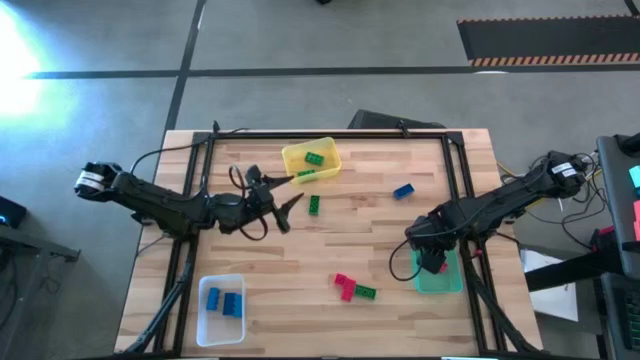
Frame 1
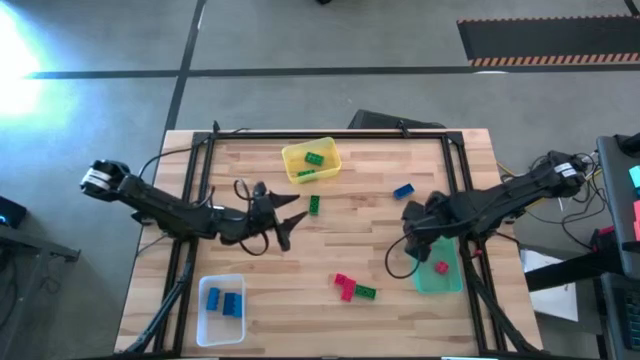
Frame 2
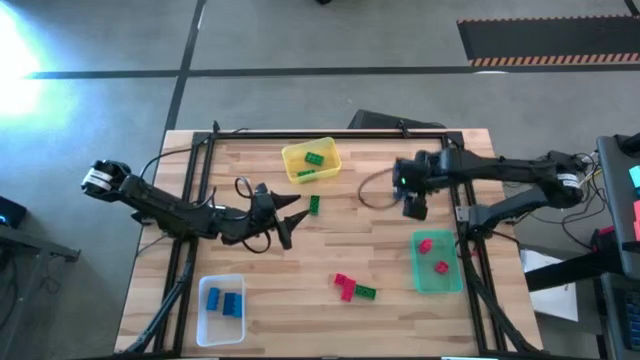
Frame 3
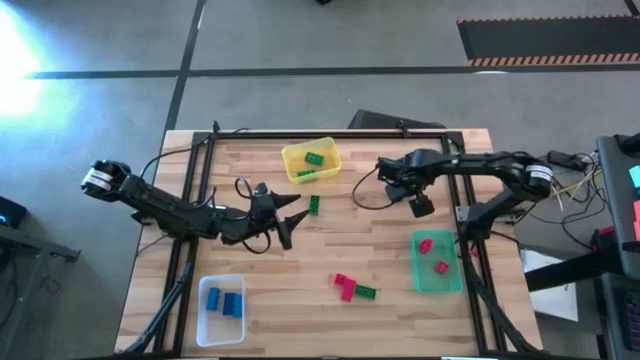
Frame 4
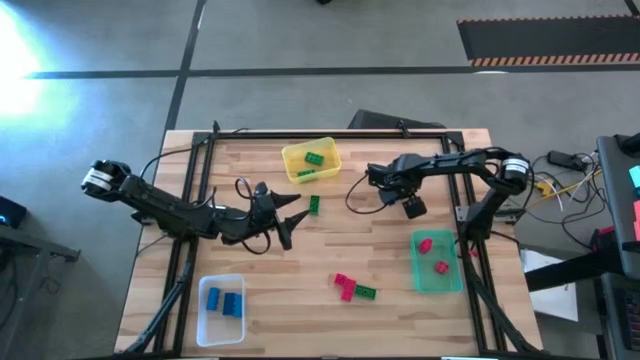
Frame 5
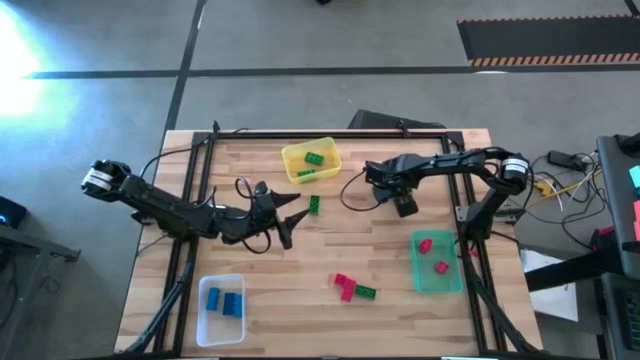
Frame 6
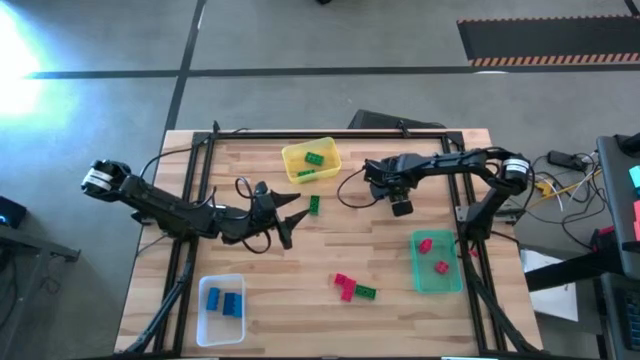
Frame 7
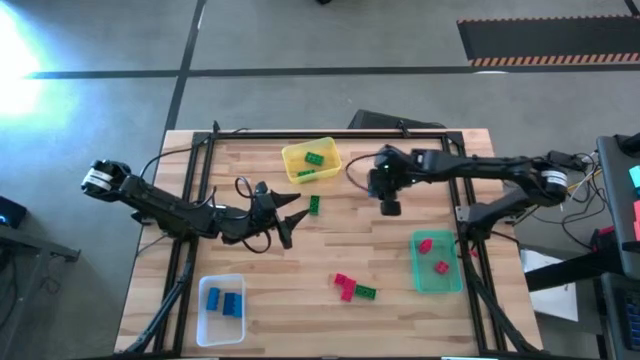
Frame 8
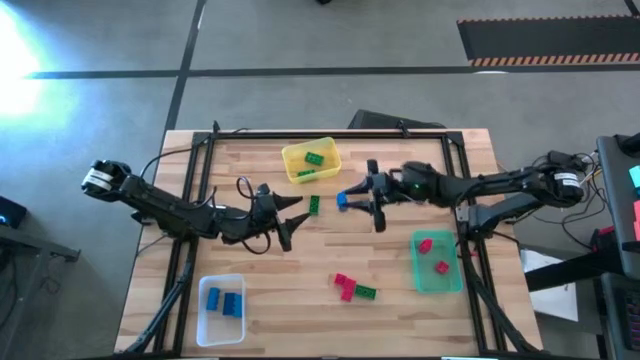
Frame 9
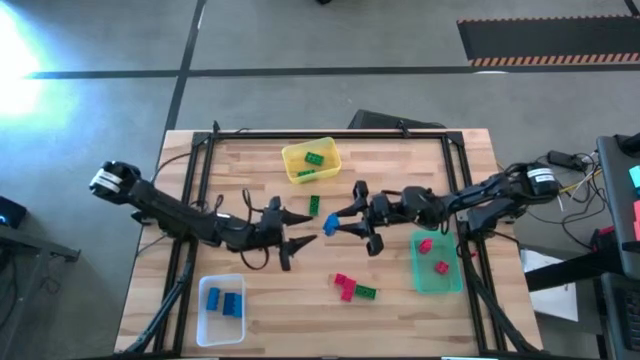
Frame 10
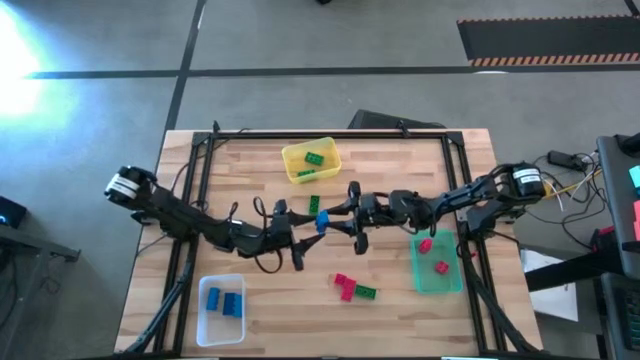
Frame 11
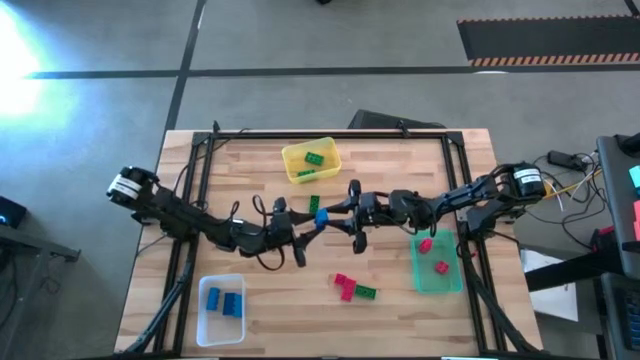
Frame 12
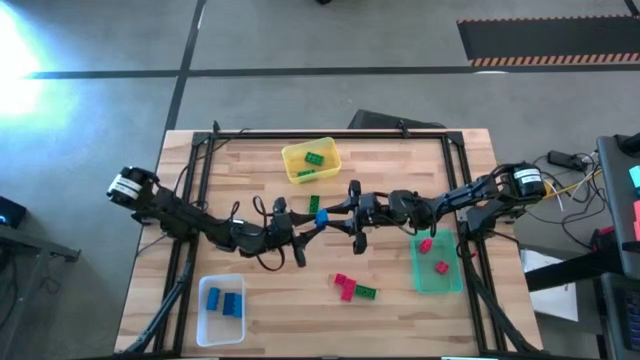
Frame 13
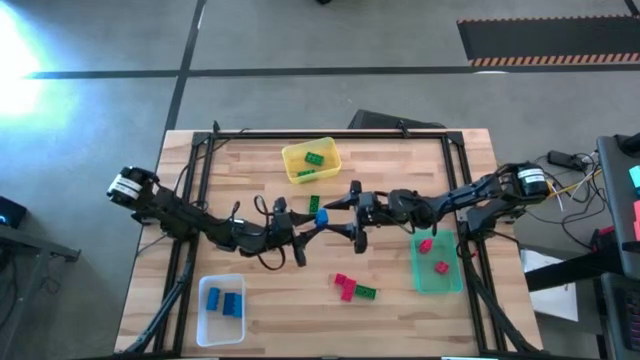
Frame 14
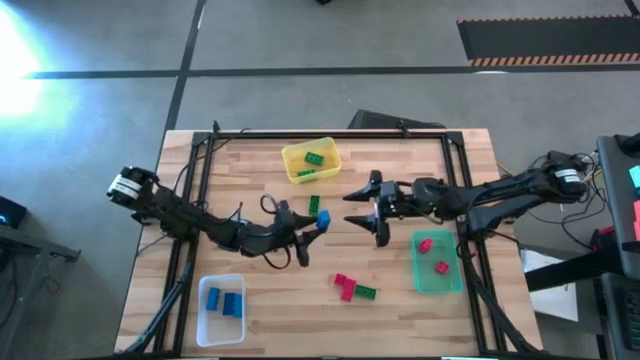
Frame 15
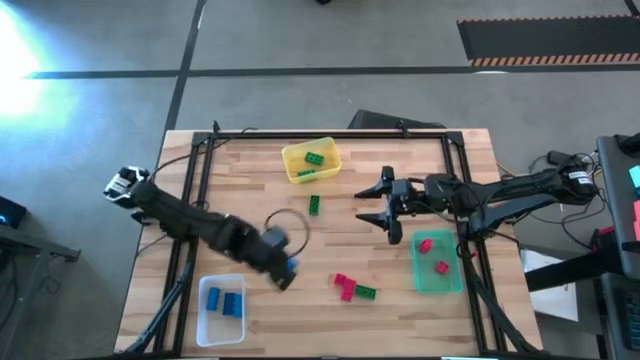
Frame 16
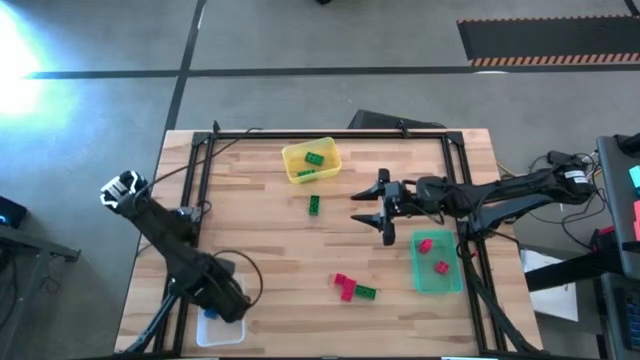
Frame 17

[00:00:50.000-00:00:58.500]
Task: Sort & place blocks by color
Put the blue game piece into the transparent bin

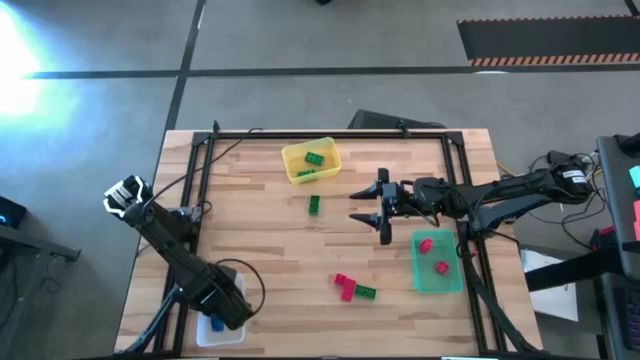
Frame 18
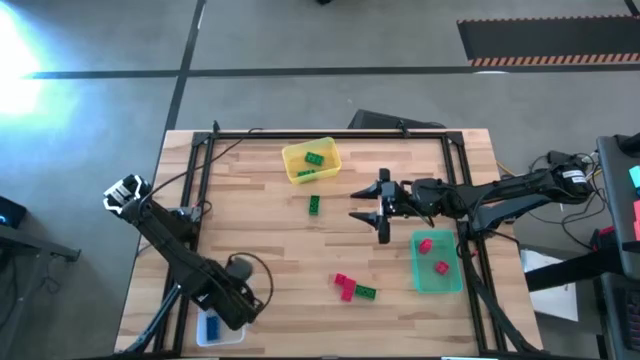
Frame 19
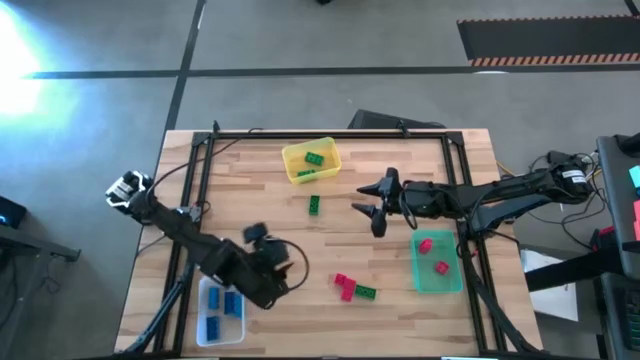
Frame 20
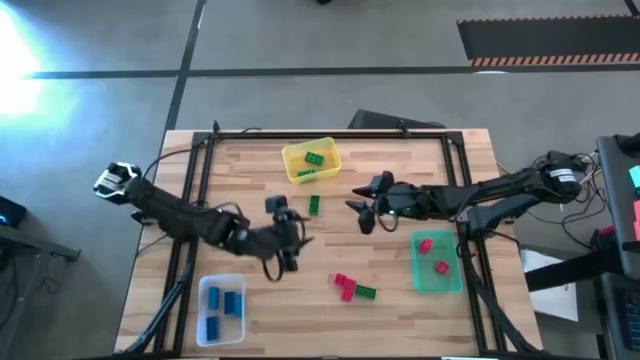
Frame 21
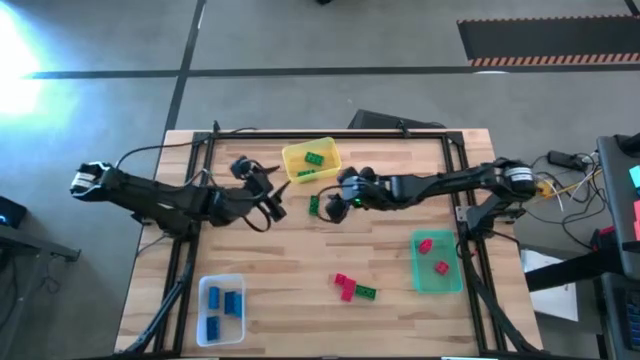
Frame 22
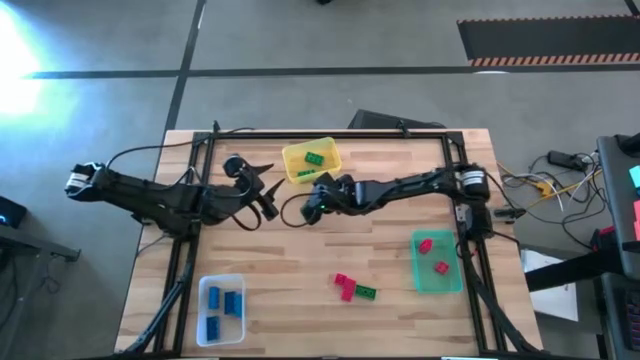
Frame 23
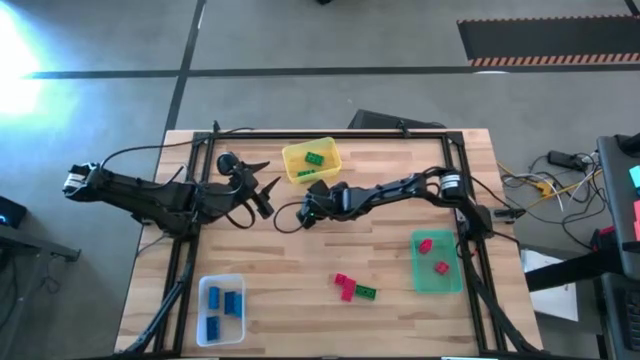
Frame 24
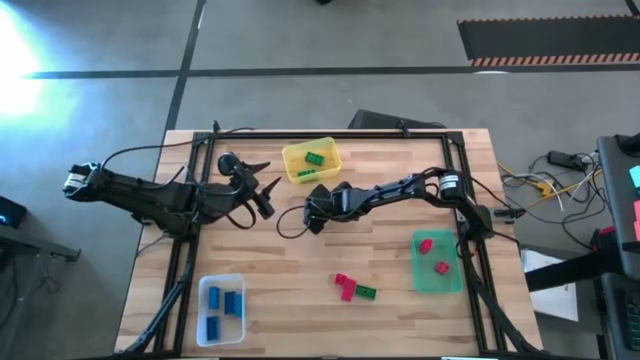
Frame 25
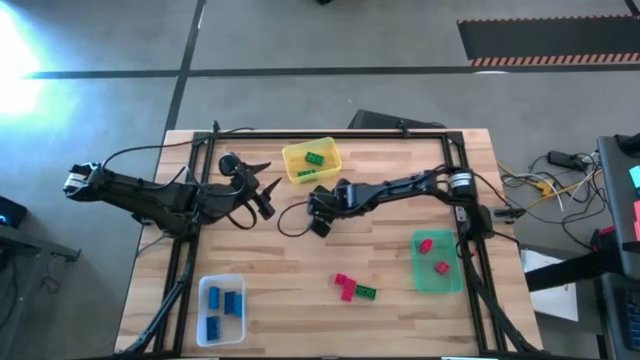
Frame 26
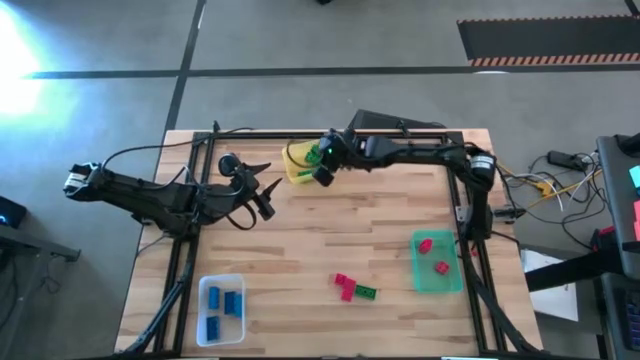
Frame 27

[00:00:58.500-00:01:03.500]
Put the green game piece into the yellow bin

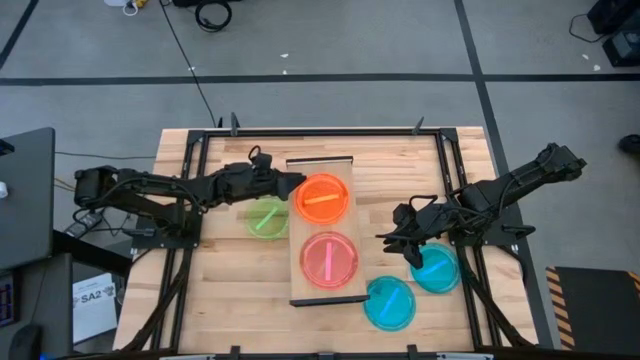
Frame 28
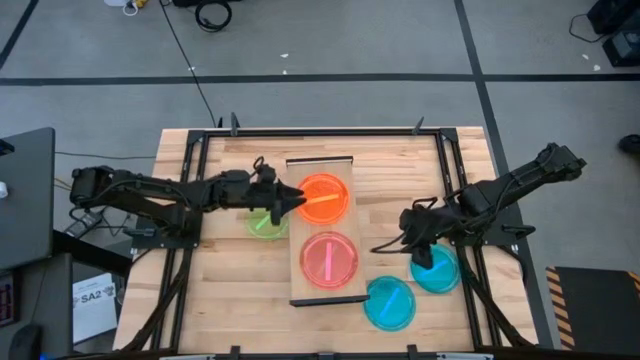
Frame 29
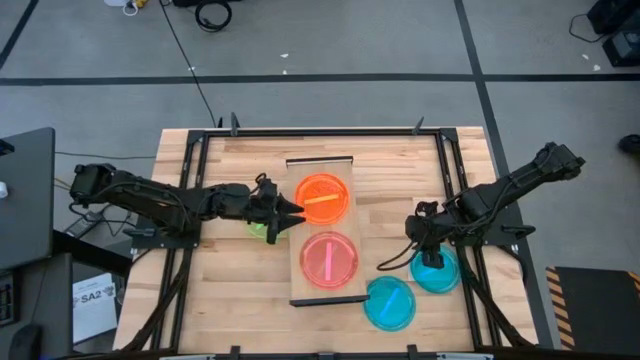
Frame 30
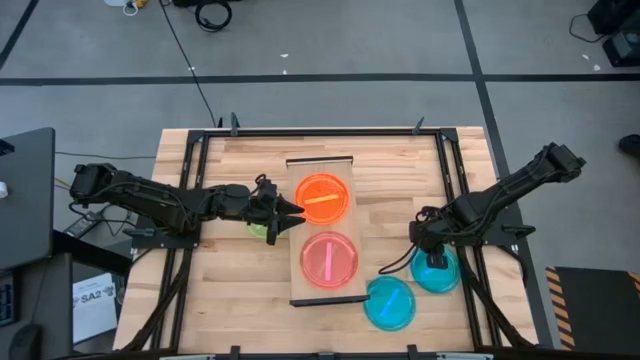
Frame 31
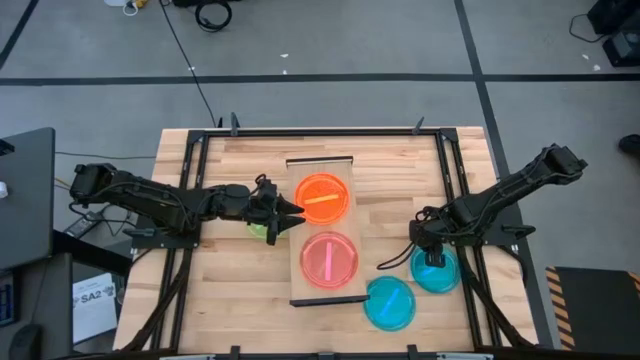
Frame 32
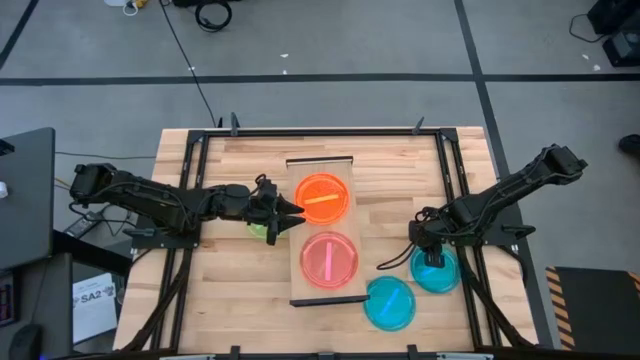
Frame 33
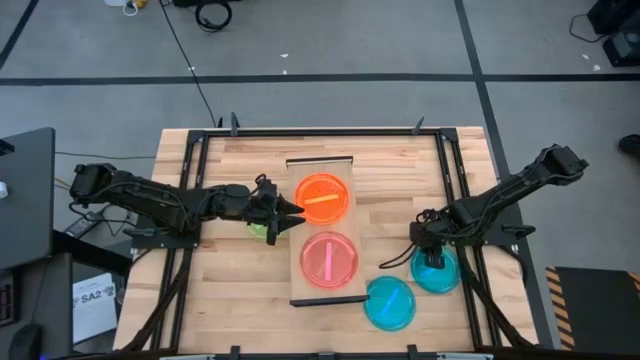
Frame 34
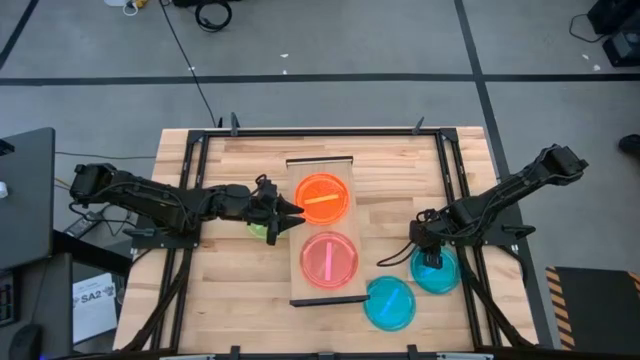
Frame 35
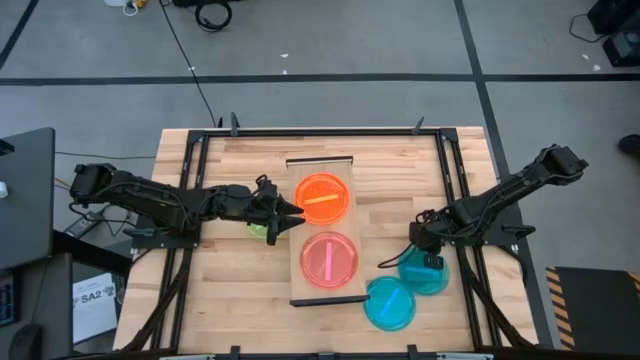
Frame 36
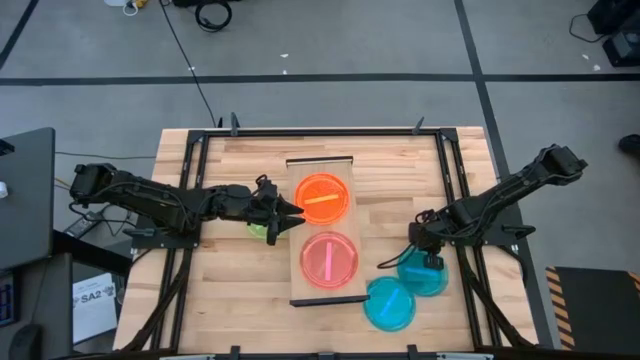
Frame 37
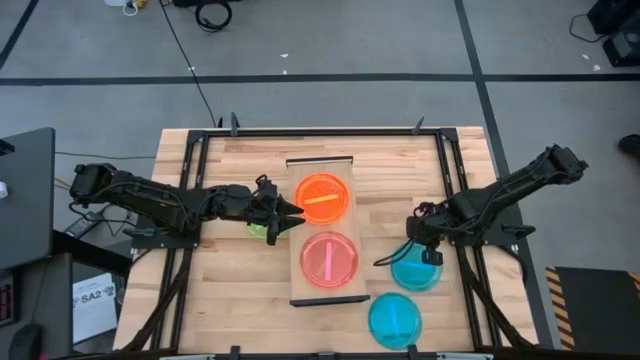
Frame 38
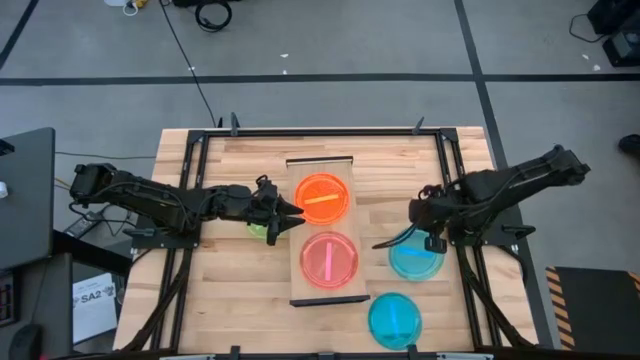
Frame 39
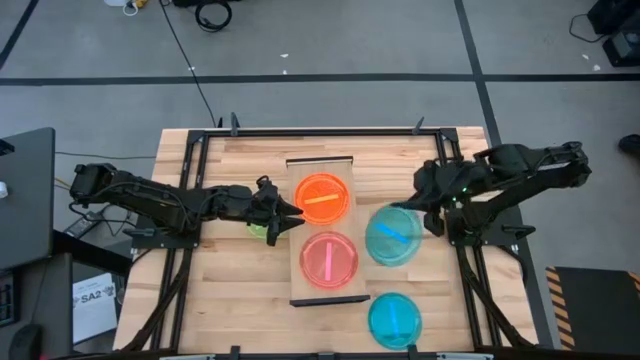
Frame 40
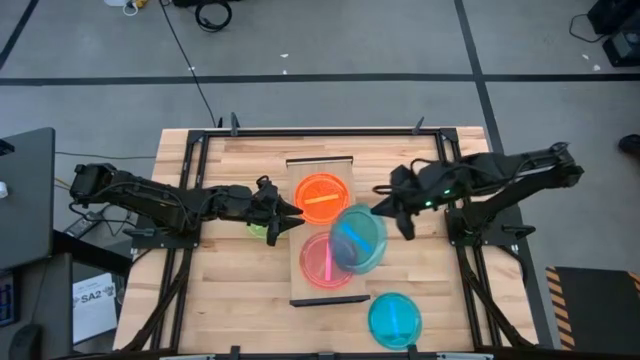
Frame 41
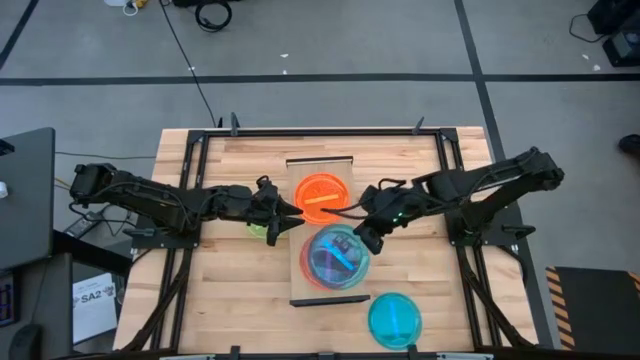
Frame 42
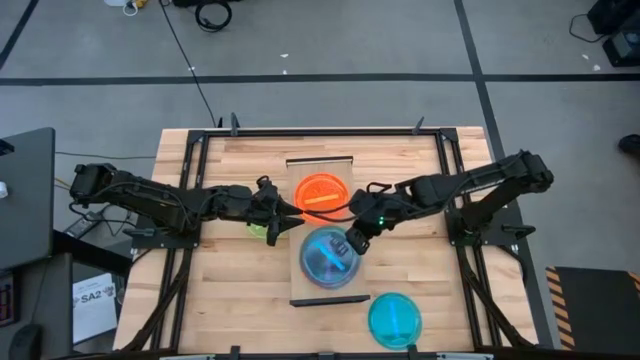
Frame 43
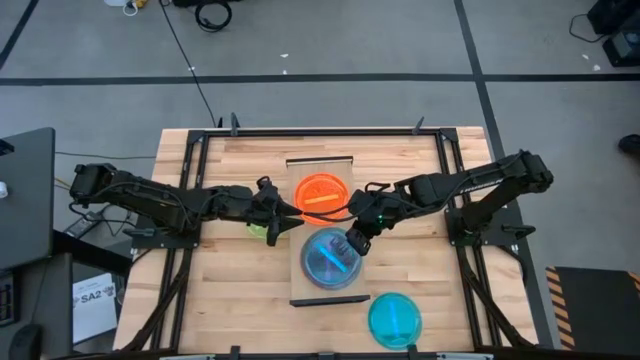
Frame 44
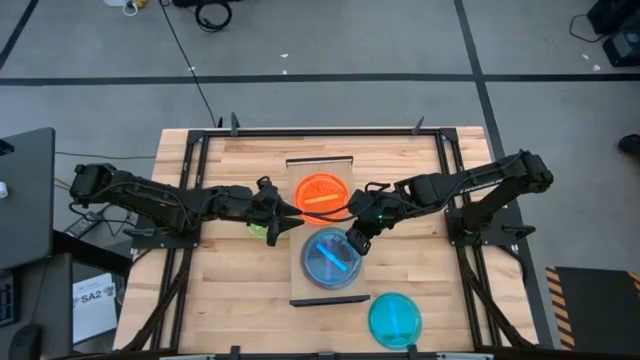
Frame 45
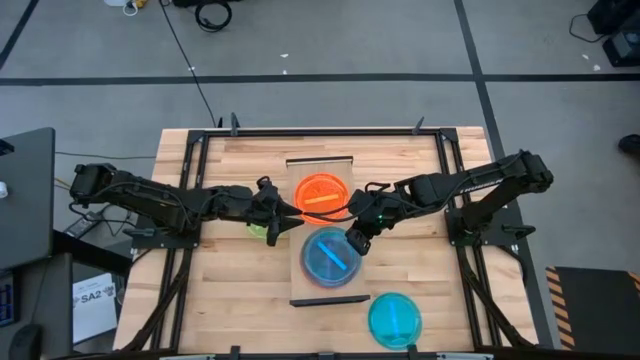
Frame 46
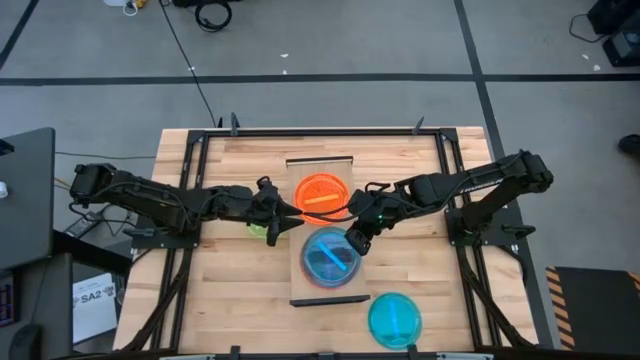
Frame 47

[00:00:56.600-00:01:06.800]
Task: Place and stack plates onto a shelf
Stack the top blue plate on top of the pink plate on the shelf
